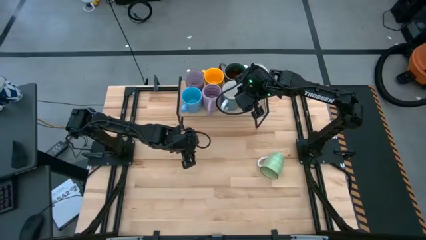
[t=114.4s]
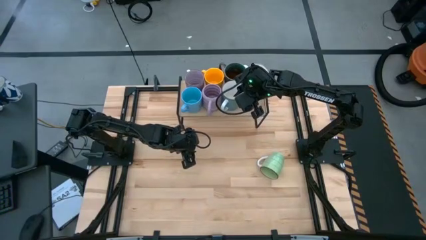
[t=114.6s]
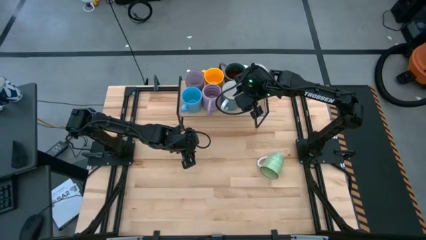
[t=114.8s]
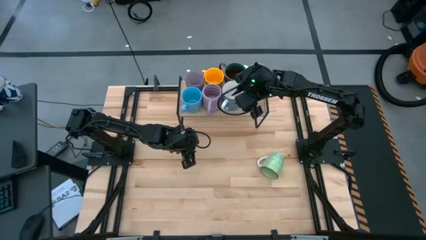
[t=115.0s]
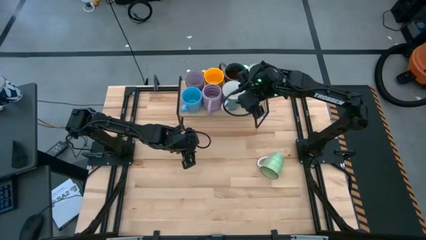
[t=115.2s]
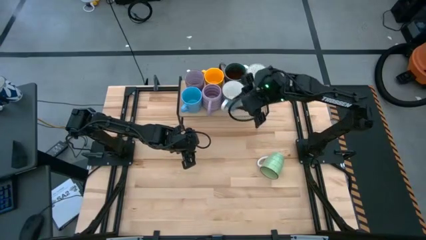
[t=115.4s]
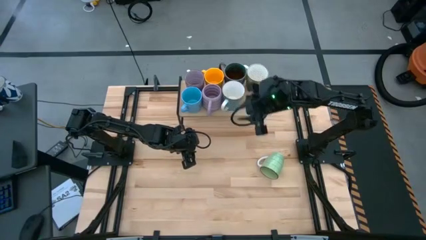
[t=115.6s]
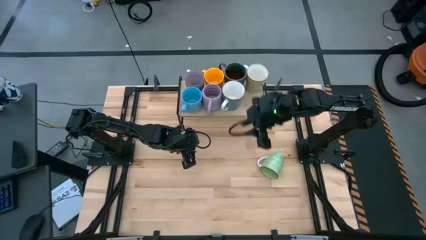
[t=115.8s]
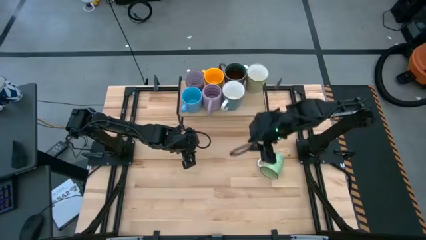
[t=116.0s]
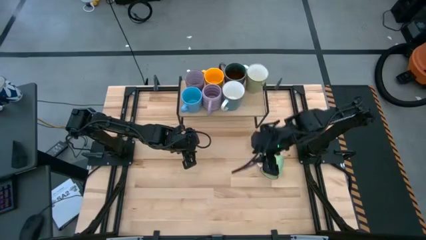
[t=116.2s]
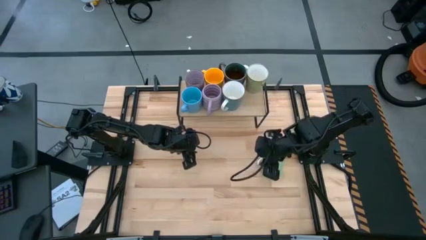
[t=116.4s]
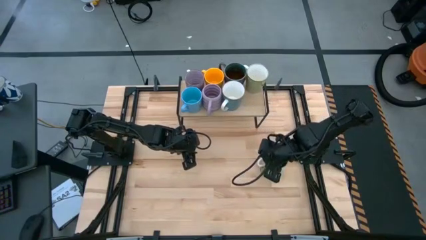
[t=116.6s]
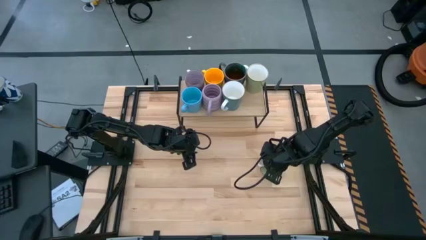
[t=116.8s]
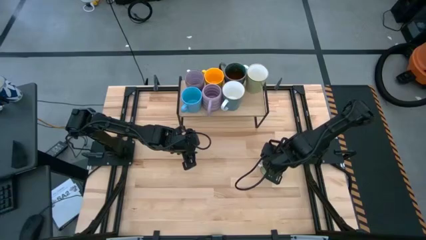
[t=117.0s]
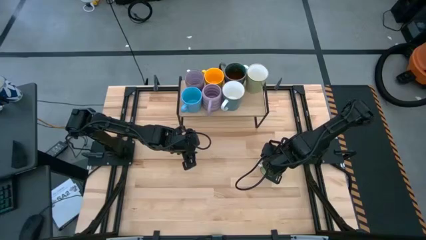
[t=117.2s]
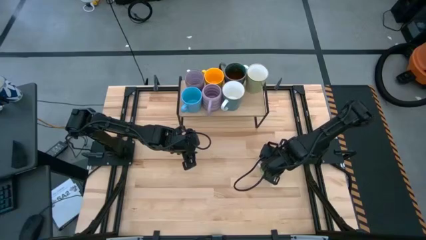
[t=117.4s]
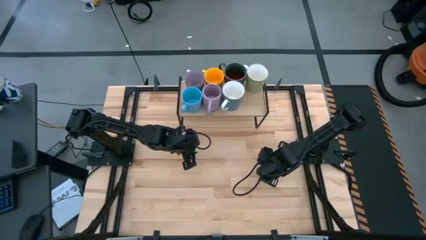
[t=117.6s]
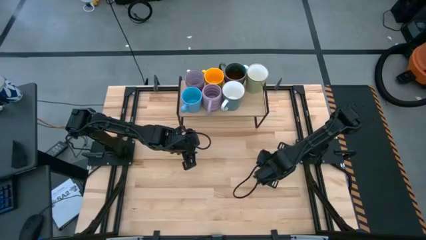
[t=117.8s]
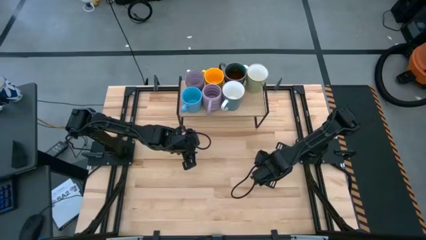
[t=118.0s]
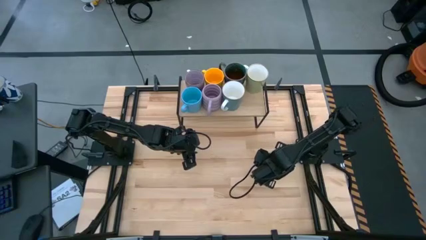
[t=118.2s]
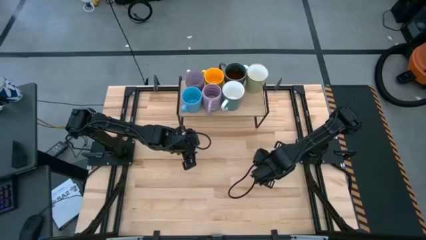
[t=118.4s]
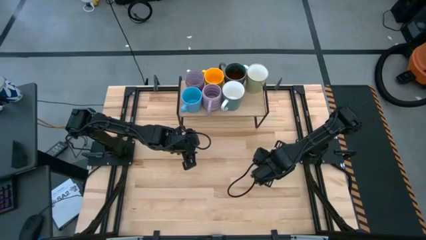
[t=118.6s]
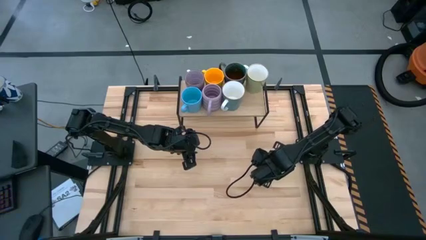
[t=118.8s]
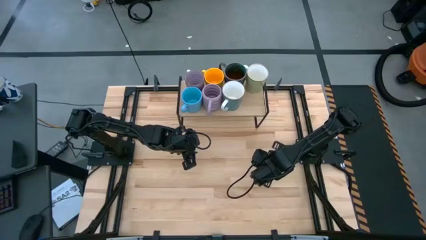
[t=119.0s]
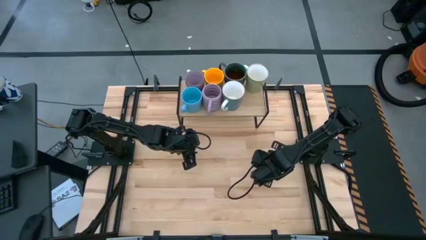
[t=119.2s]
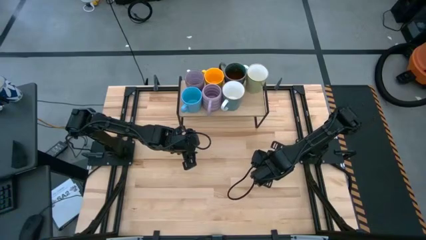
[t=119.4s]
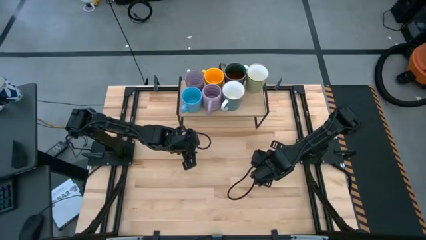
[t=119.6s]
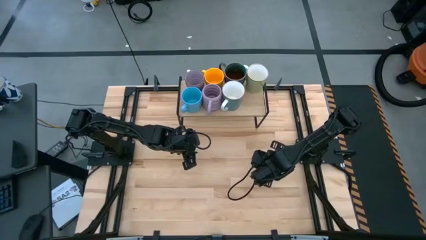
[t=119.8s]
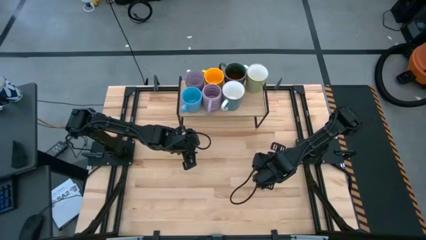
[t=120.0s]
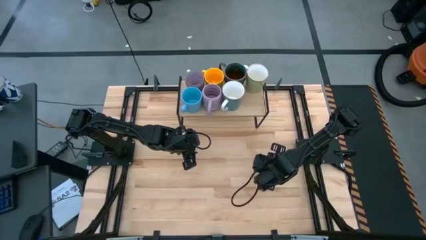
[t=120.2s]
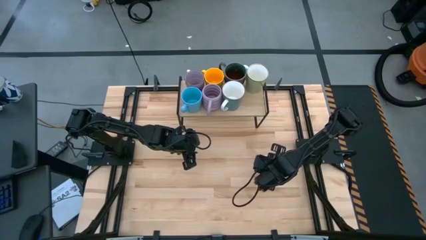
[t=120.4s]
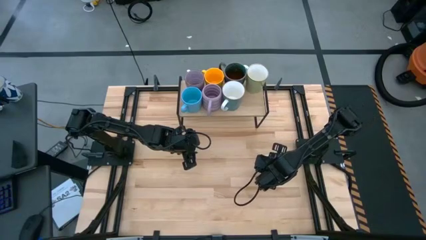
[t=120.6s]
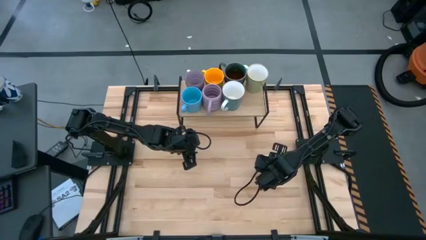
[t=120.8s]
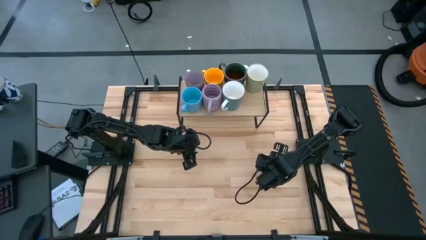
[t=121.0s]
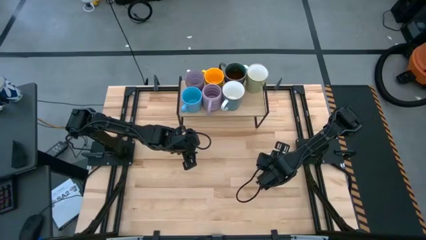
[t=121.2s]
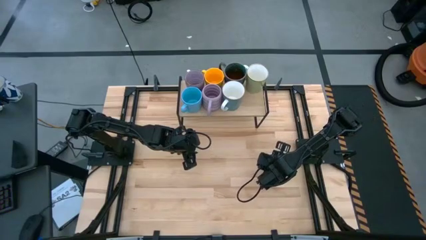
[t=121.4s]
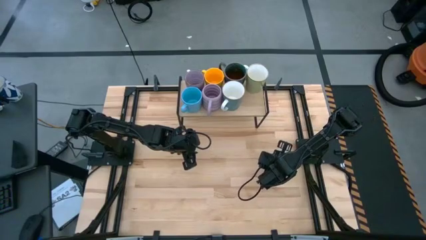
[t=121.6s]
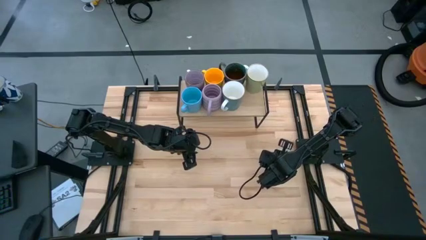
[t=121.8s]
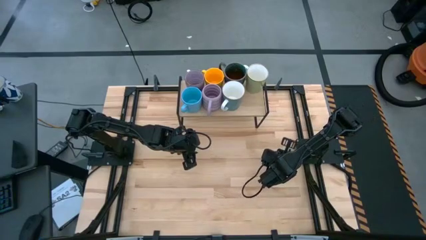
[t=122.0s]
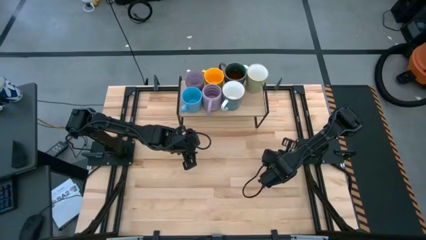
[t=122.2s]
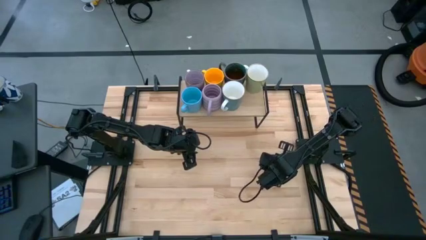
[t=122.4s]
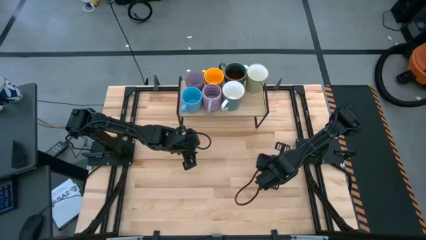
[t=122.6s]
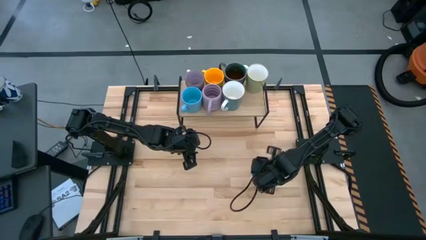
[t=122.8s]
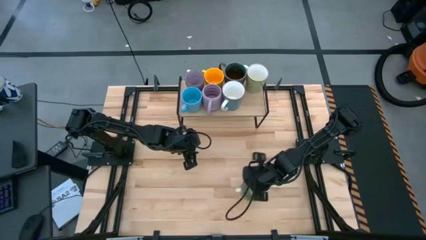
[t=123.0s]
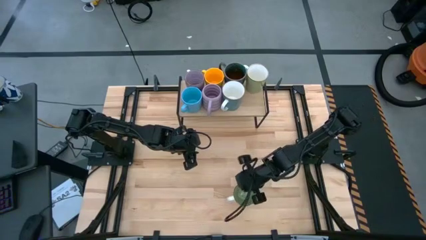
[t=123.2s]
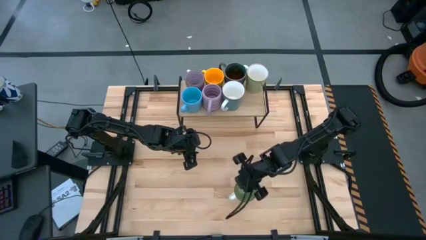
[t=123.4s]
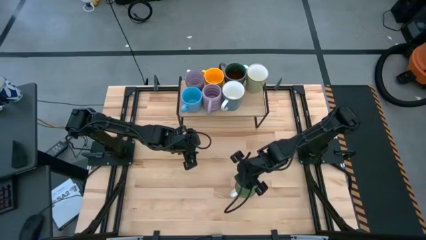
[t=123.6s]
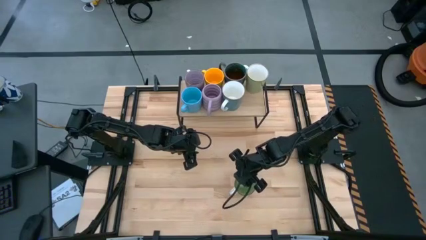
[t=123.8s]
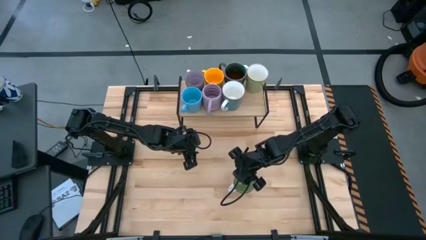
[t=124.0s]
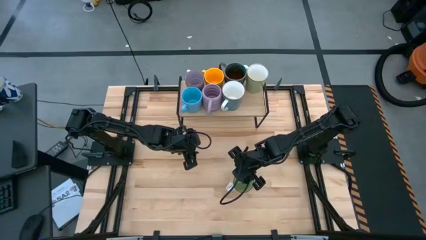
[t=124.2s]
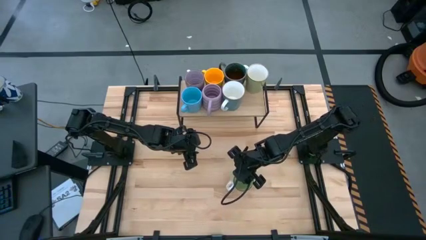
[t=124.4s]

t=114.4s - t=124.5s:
Task: Place coffee mugs
Put the light green mug on the shelf
